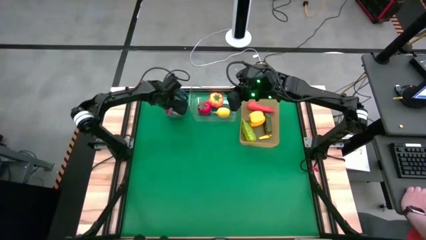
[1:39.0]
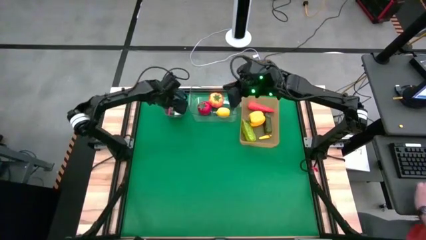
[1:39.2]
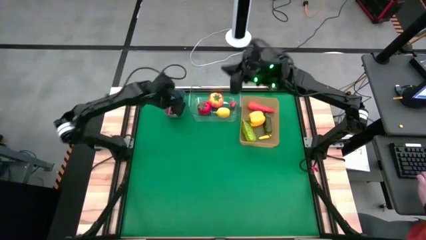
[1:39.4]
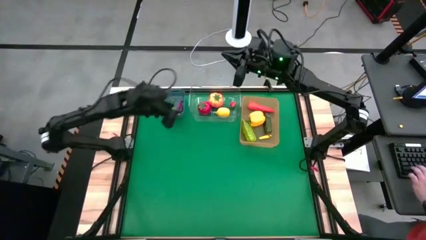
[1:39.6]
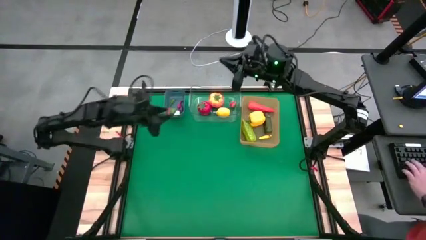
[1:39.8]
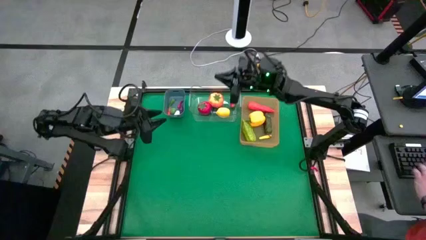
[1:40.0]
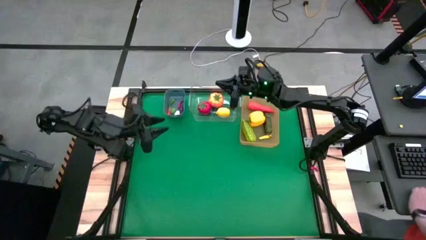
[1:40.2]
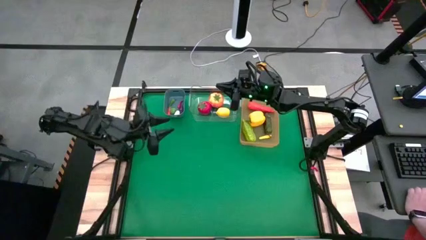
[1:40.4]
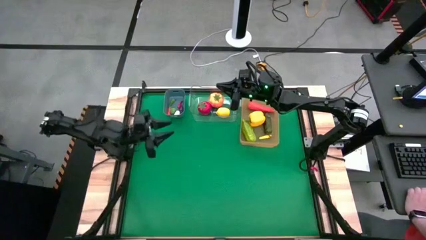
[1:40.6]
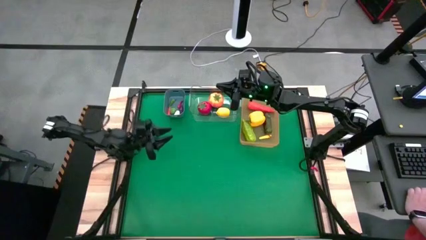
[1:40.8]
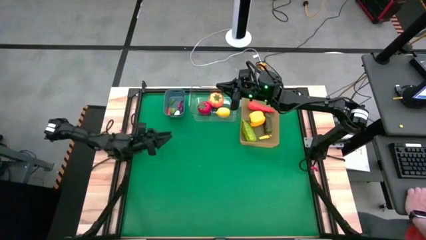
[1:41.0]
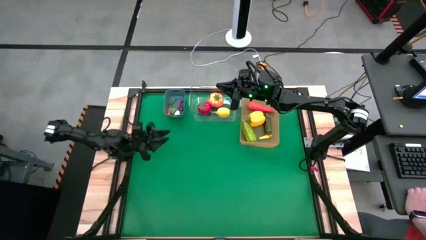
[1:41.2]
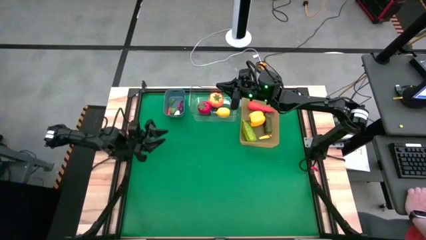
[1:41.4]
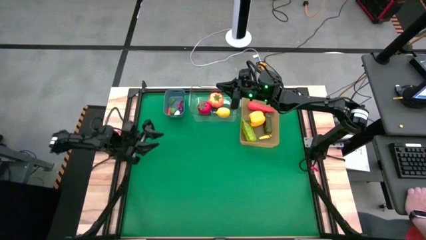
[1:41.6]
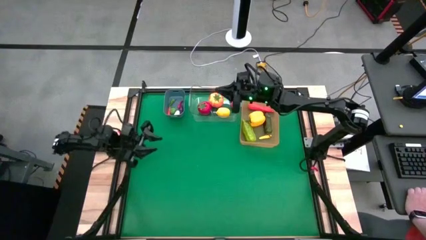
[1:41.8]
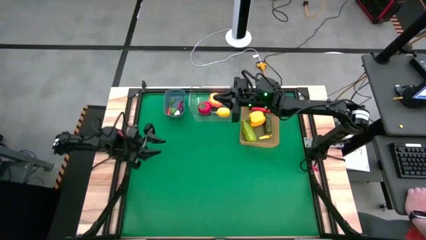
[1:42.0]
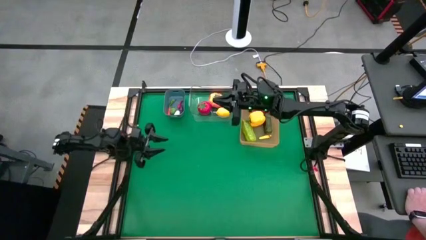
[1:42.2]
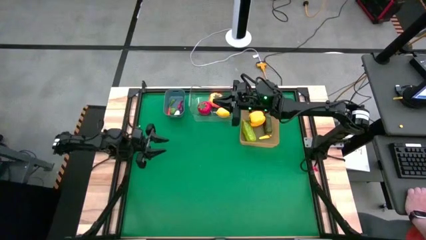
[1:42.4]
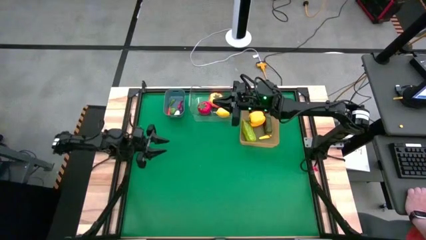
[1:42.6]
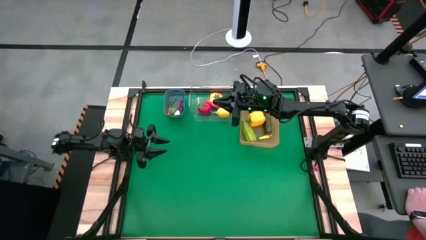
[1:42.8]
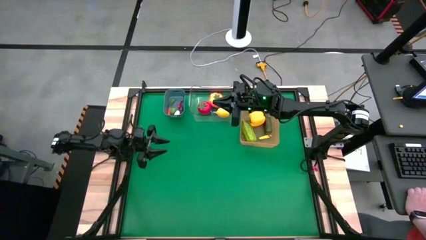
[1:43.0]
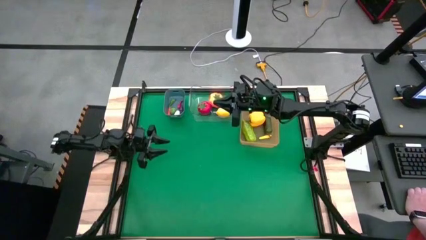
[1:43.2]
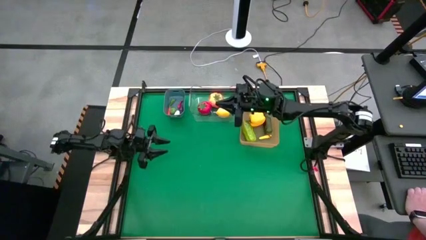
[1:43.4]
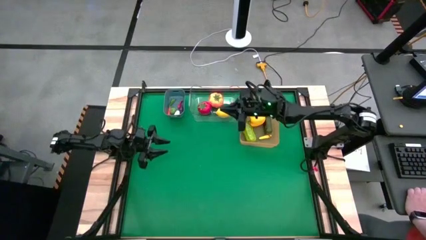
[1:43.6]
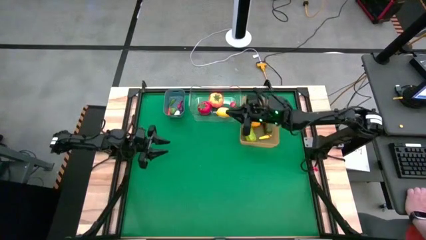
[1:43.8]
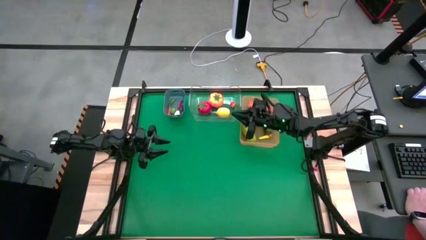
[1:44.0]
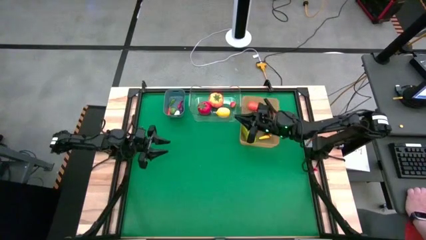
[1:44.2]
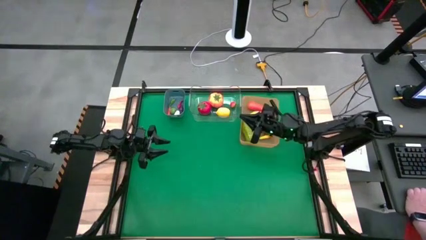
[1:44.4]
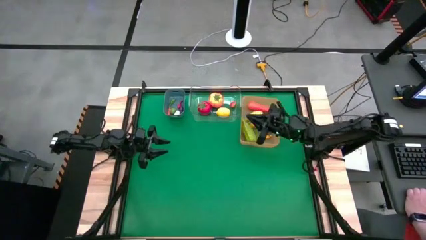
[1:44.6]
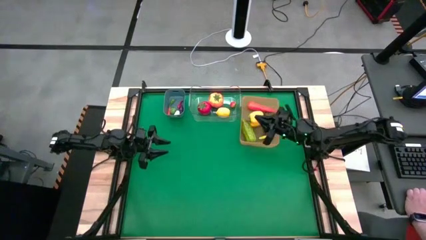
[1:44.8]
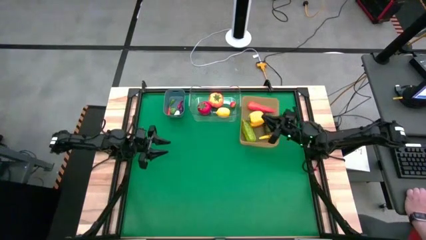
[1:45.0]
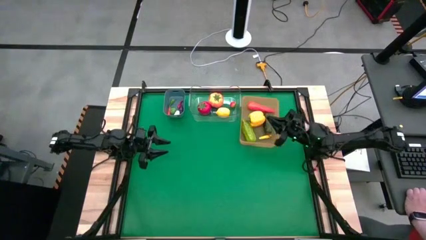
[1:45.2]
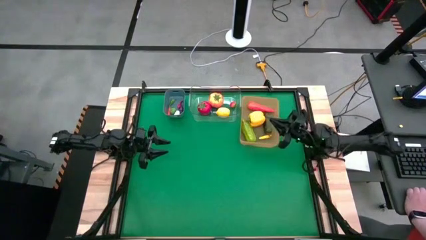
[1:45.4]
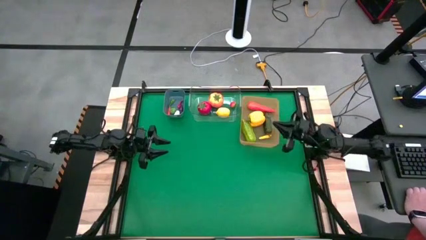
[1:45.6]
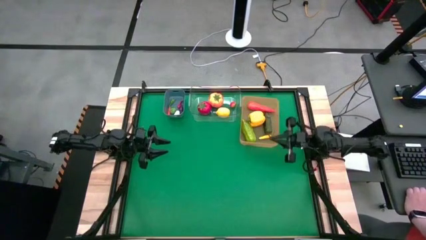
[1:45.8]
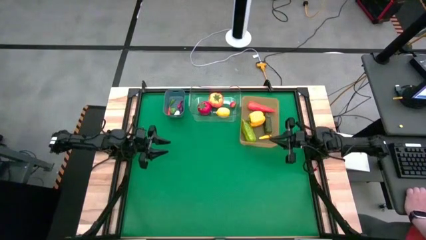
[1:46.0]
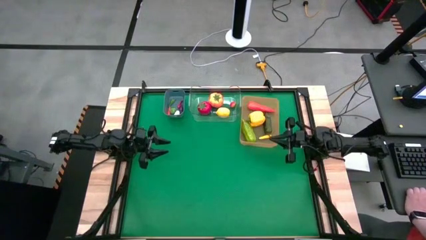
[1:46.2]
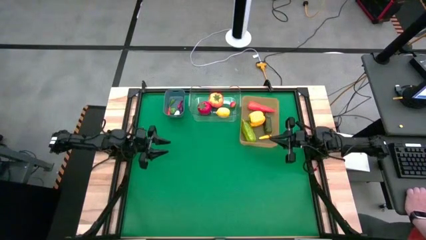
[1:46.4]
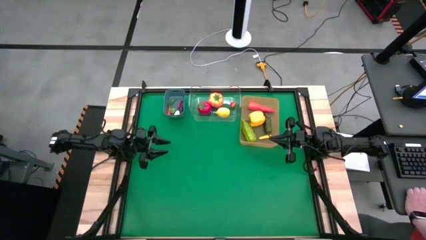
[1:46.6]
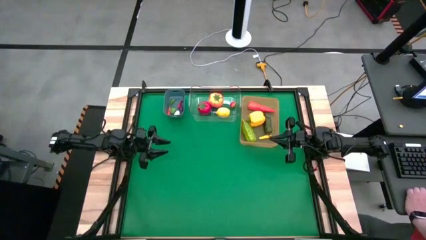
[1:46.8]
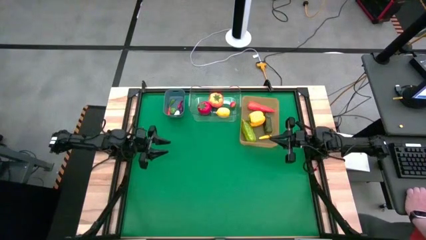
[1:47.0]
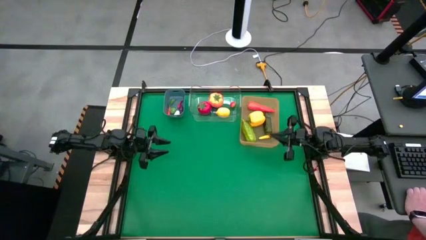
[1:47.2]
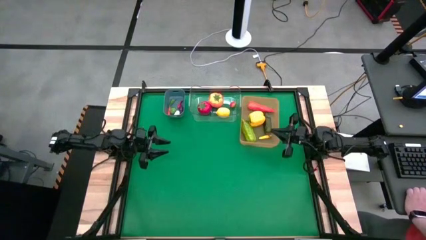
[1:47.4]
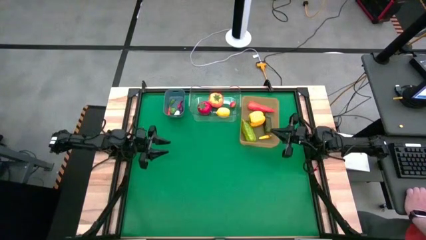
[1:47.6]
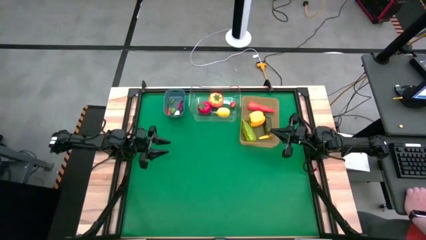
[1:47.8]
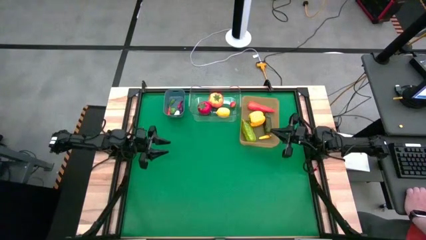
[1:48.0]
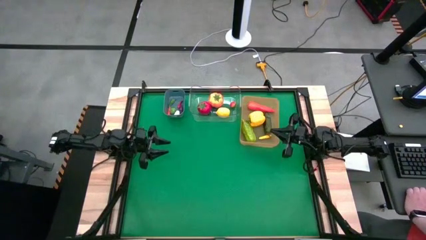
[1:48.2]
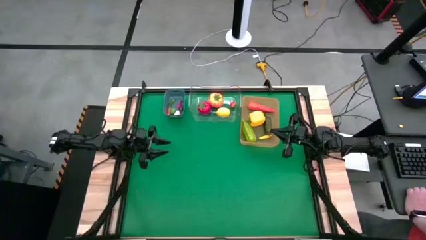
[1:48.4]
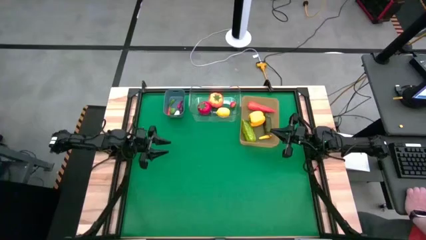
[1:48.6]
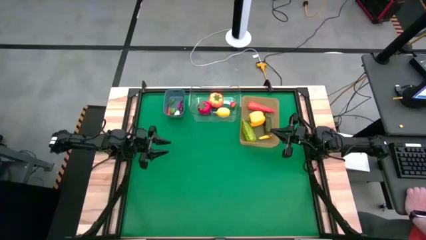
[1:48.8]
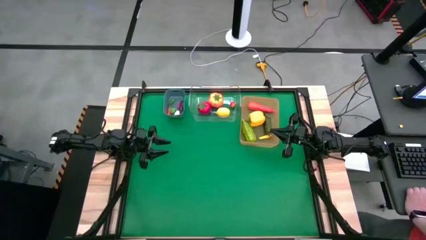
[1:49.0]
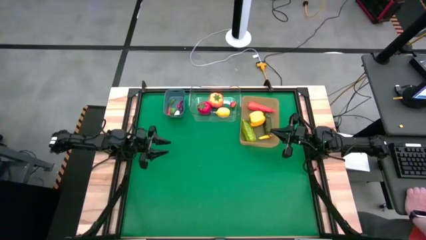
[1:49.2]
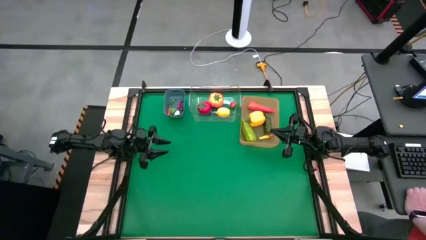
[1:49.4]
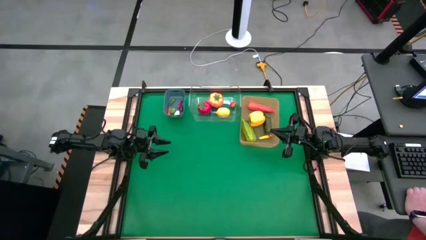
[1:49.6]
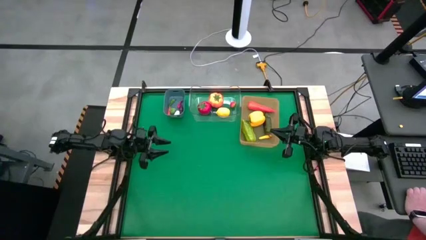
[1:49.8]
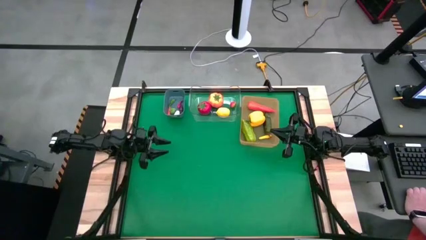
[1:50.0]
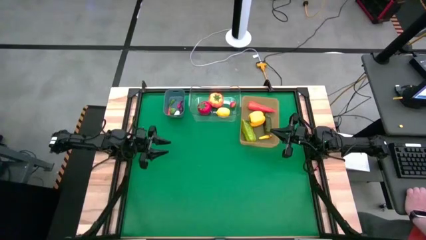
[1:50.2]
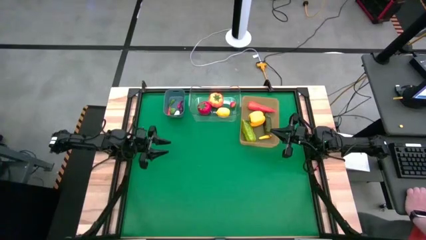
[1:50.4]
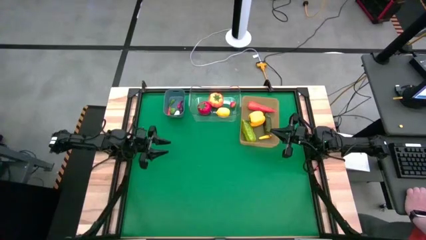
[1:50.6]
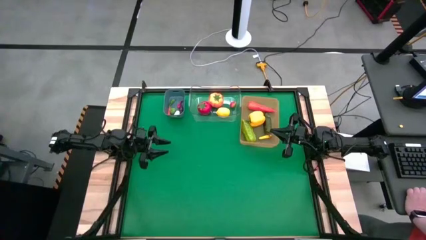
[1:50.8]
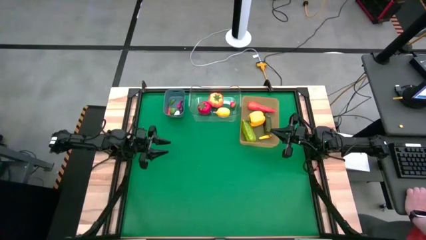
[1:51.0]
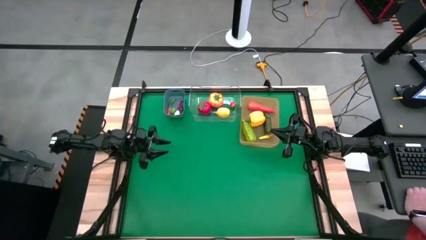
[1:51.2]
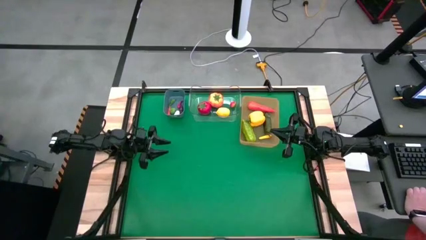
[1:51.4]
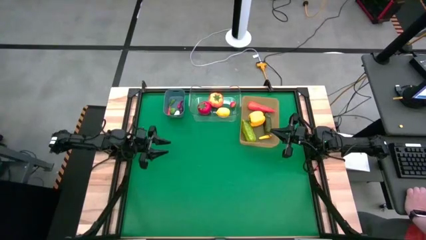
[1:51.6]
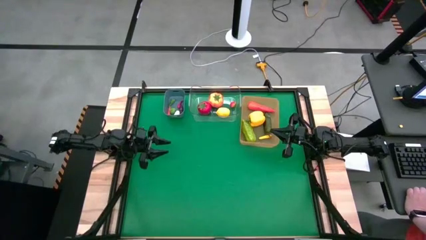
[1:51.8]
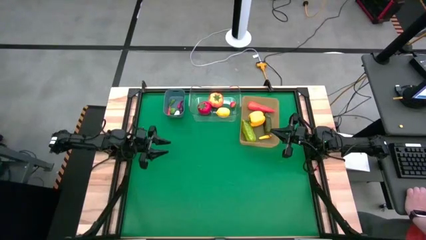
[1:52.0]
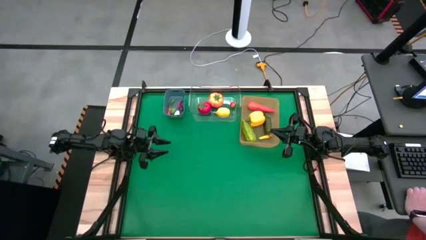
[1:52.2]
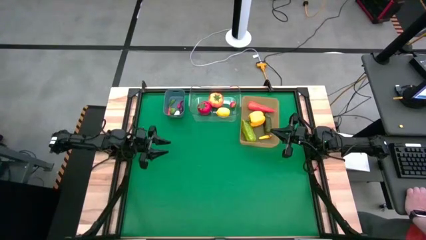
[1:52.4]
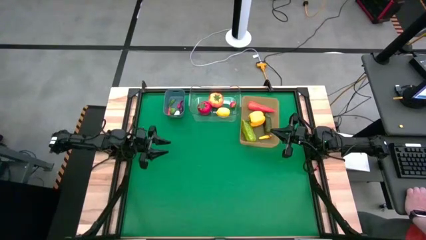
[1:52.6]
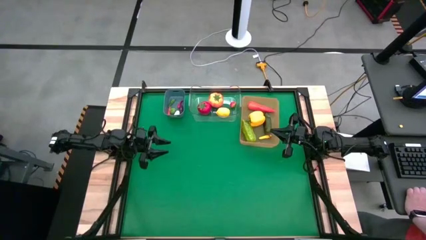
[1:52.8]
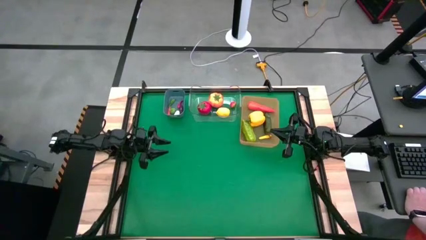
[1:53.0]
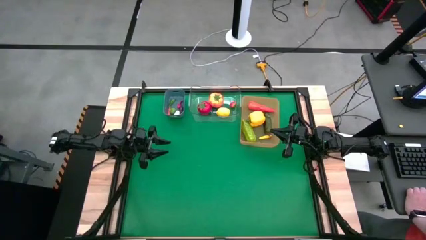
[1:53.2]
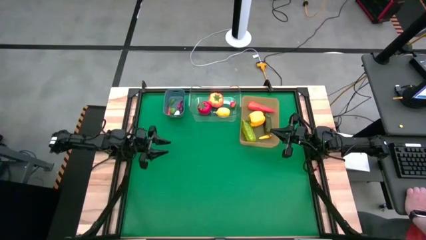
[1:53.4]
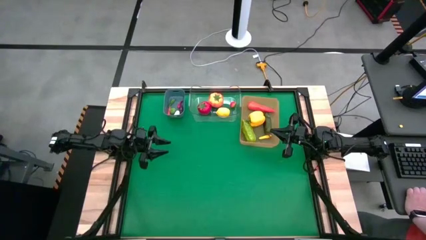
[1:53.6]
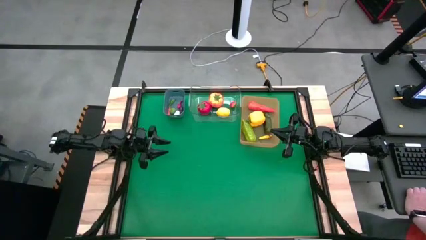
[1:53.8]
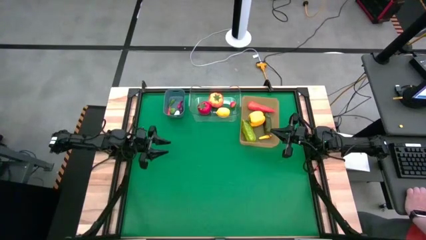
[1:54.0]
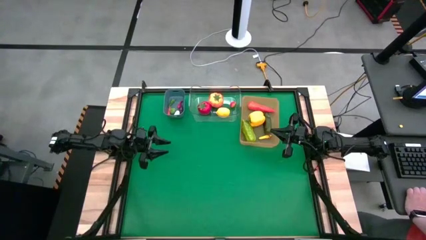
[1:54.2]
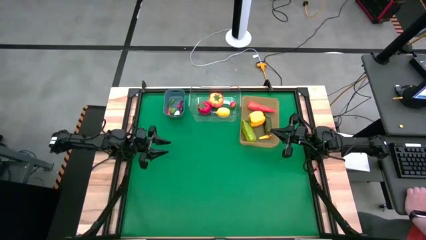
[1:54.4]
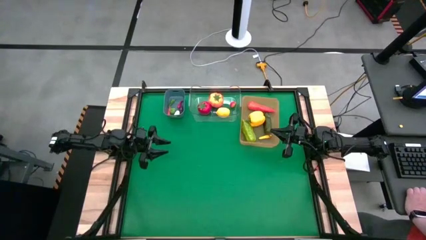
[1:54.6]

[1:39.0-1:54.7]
Task: Sort produce into baskets
Return to Home Position

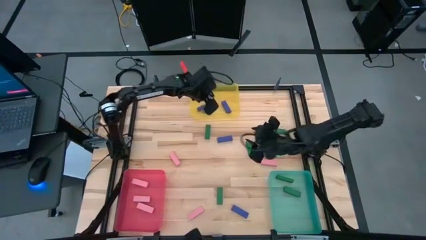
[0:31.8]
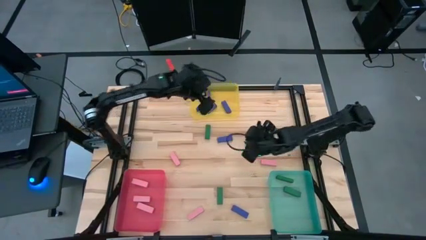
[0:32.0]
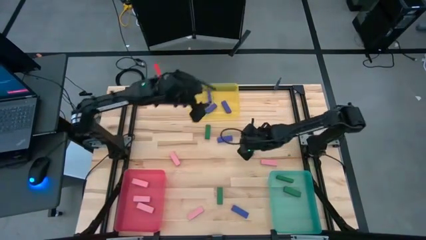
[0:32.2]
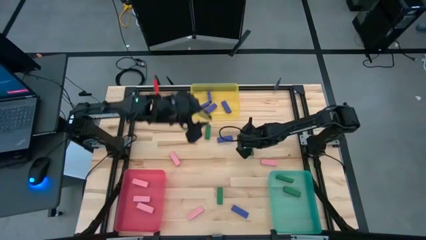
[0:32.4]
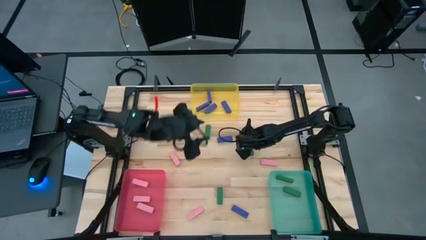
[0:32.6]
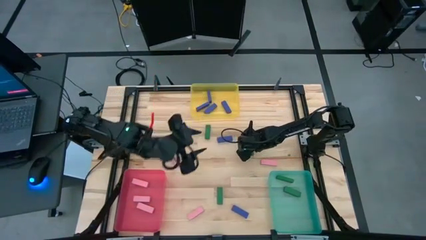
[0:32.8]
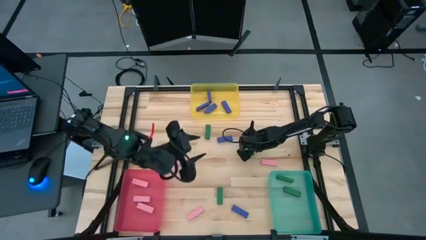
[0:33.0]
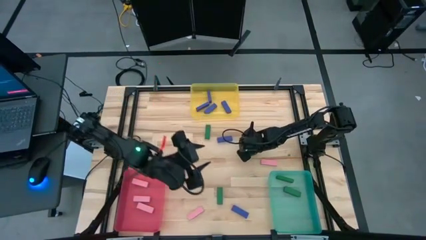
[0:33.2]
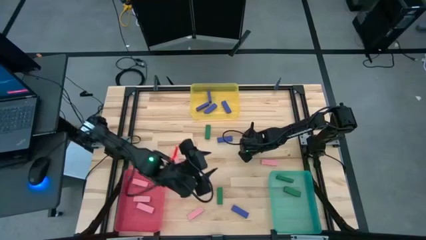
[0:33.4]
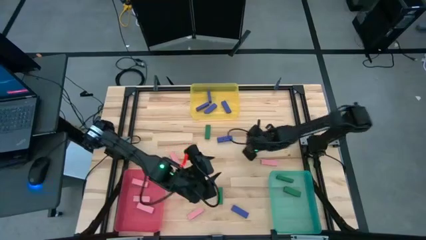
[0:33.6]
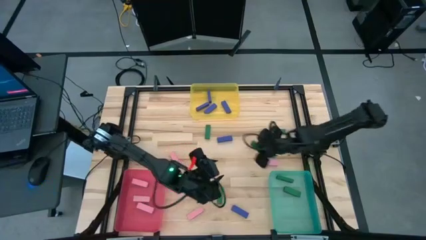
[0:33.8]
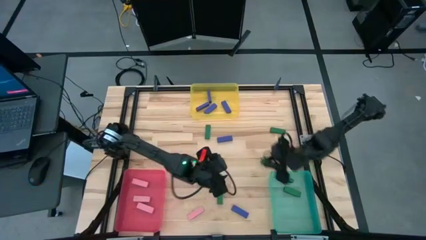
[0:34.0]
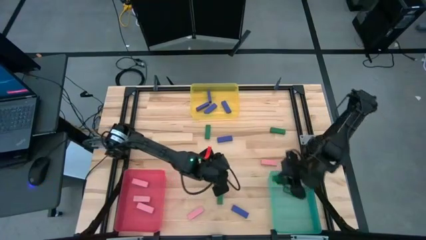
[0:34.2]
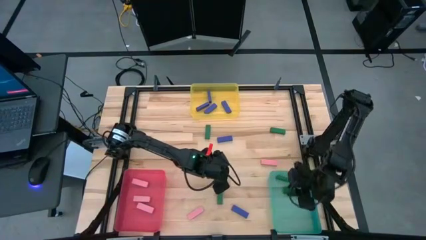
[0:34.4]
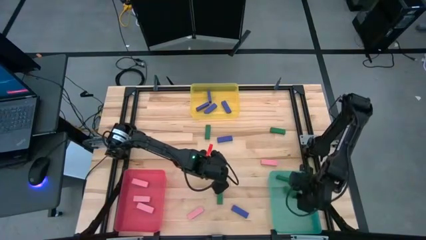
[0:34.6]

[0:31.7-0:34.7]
Task: Sort blocks
Put the green block into the light green bin
